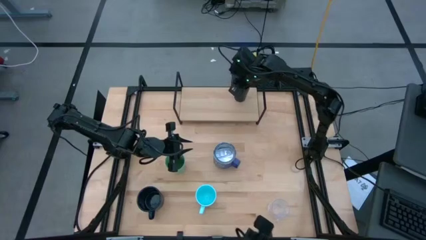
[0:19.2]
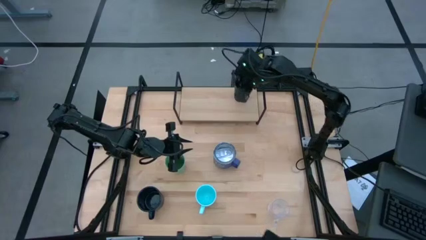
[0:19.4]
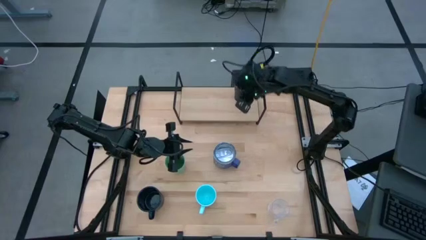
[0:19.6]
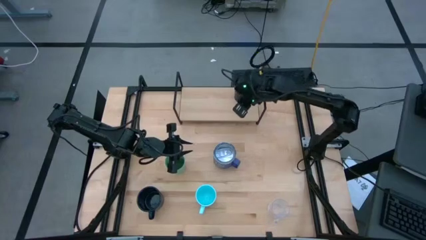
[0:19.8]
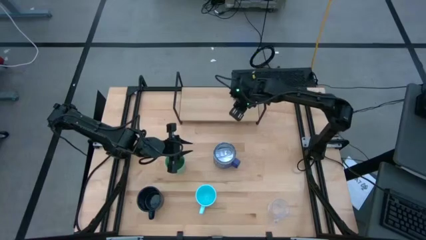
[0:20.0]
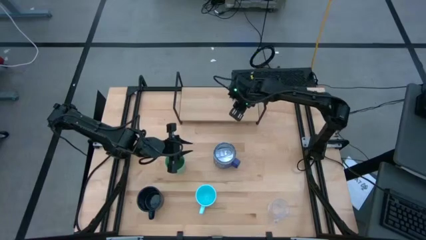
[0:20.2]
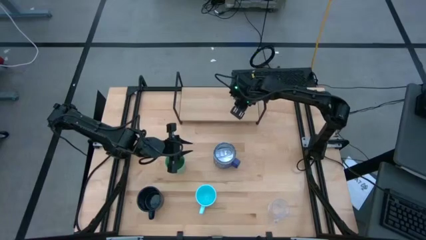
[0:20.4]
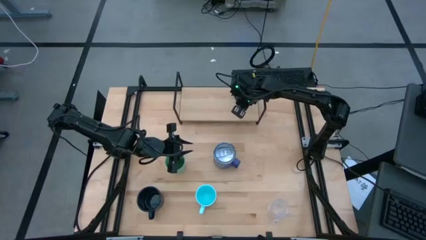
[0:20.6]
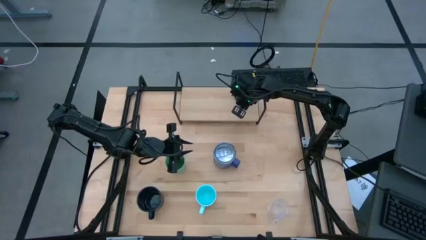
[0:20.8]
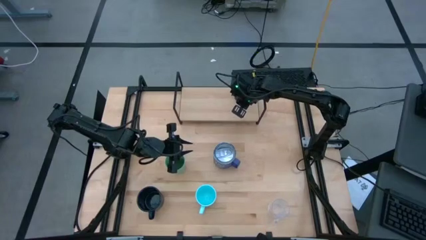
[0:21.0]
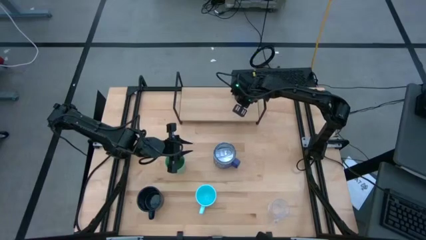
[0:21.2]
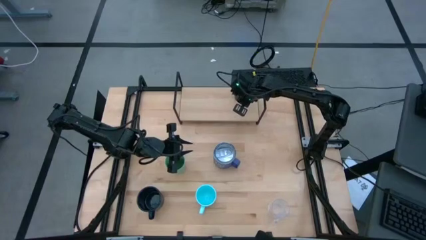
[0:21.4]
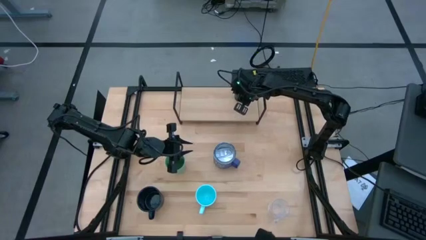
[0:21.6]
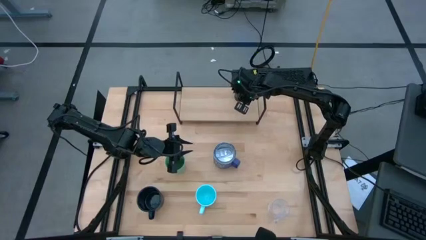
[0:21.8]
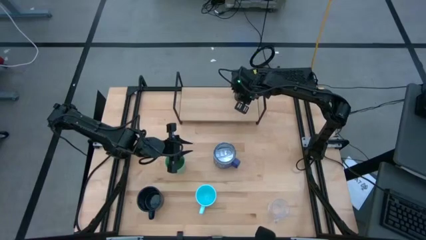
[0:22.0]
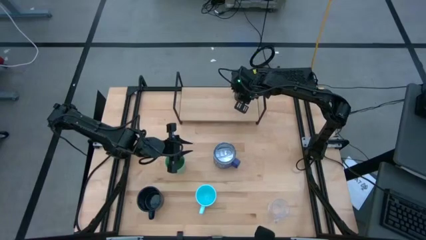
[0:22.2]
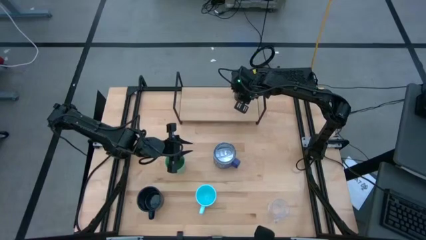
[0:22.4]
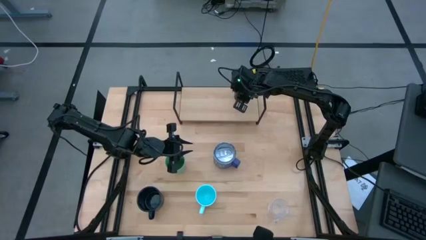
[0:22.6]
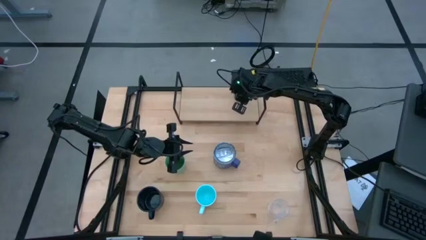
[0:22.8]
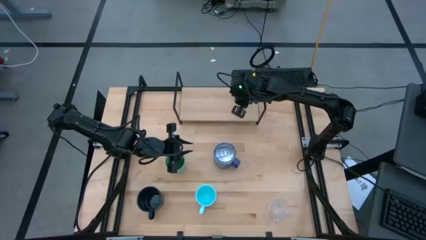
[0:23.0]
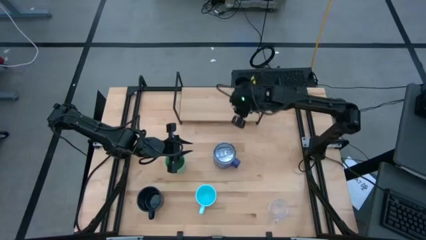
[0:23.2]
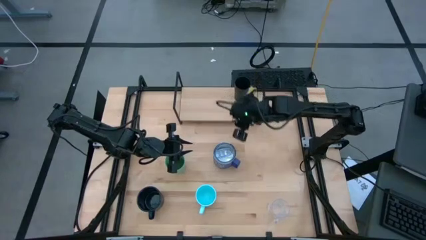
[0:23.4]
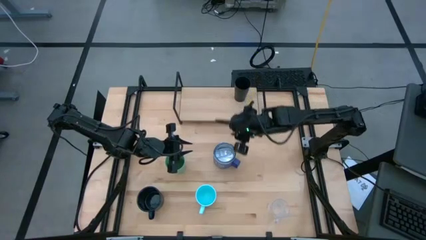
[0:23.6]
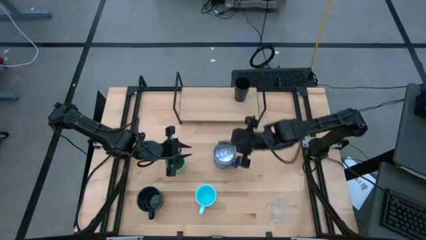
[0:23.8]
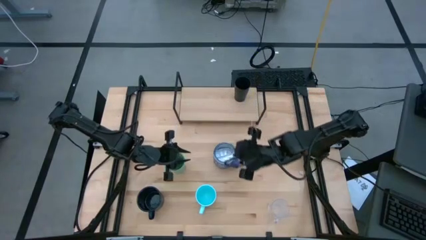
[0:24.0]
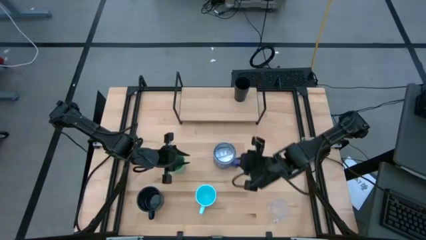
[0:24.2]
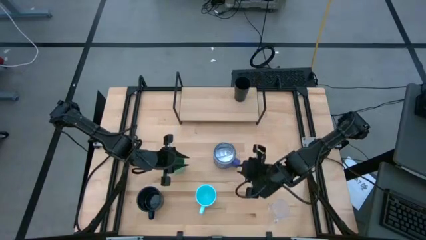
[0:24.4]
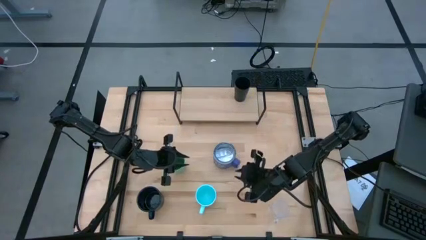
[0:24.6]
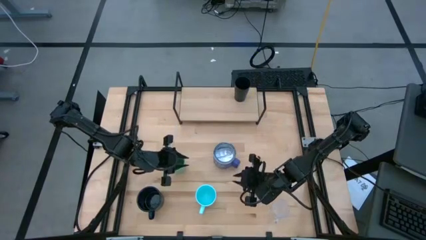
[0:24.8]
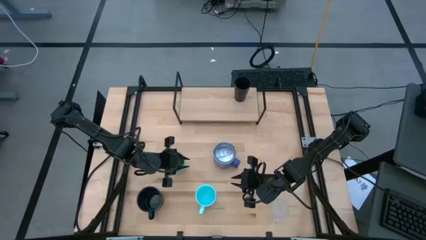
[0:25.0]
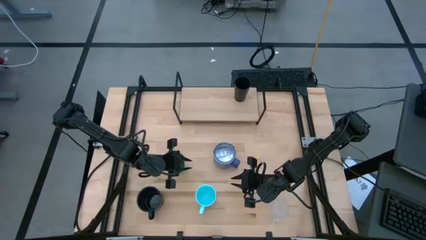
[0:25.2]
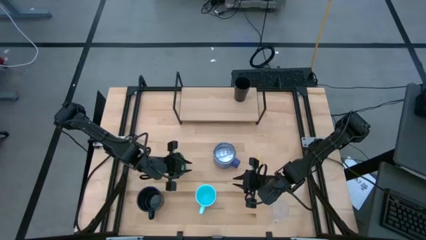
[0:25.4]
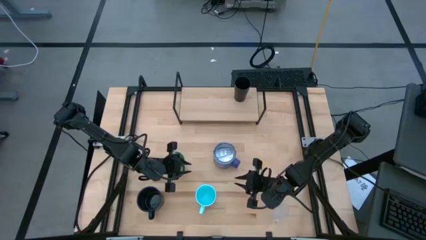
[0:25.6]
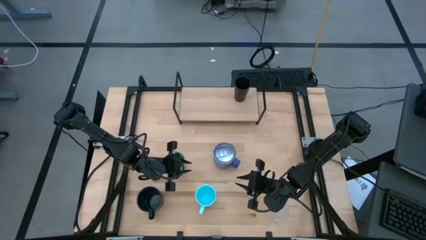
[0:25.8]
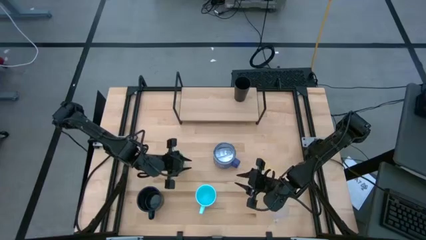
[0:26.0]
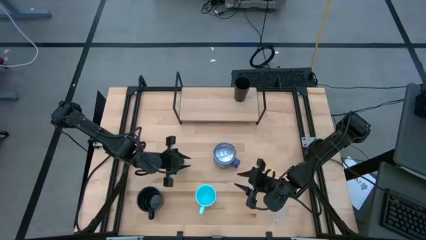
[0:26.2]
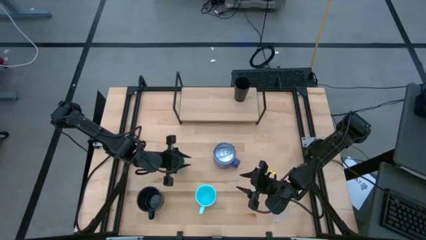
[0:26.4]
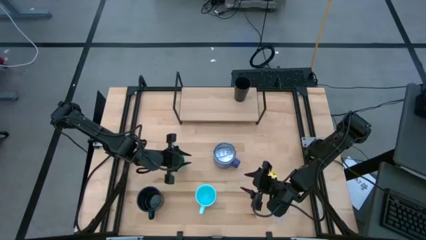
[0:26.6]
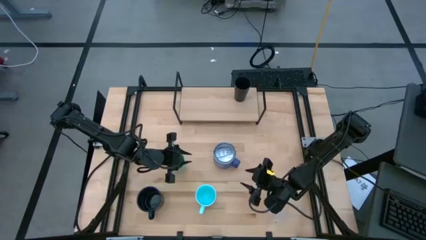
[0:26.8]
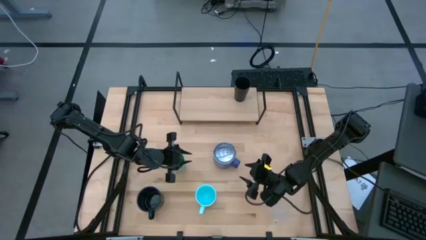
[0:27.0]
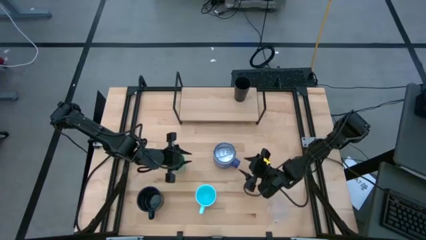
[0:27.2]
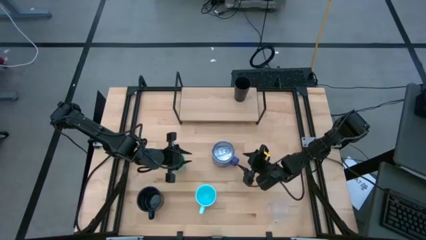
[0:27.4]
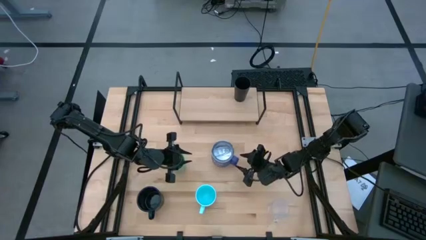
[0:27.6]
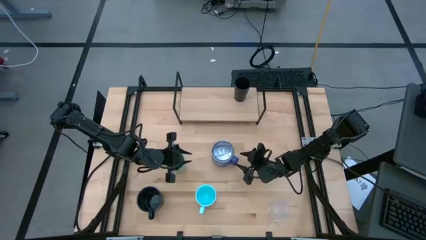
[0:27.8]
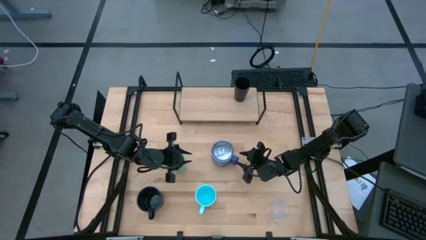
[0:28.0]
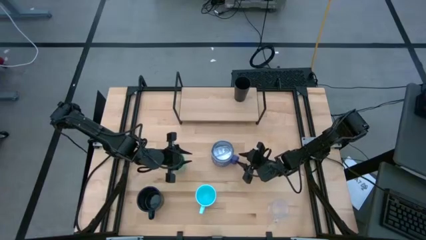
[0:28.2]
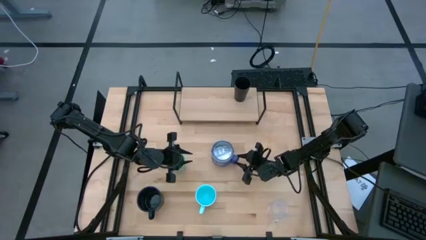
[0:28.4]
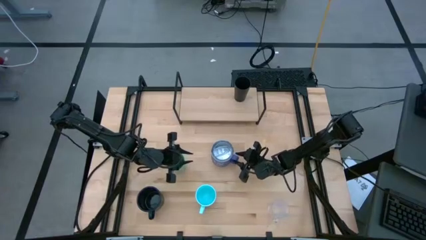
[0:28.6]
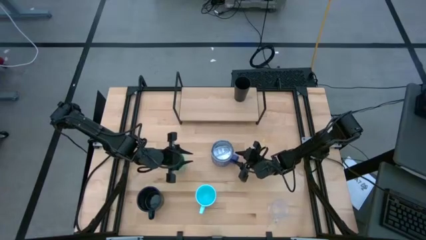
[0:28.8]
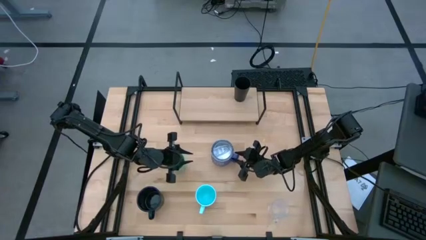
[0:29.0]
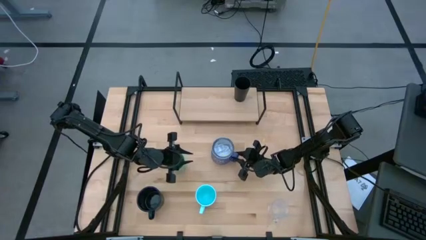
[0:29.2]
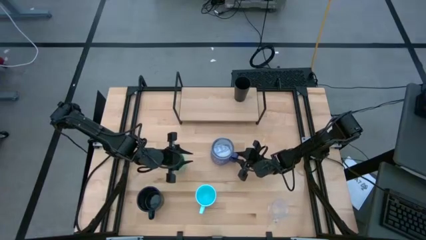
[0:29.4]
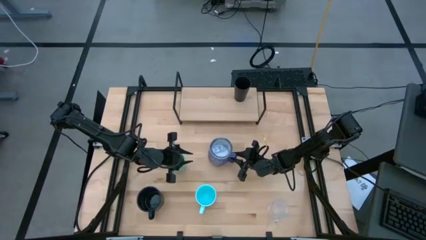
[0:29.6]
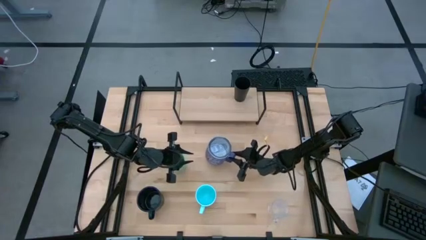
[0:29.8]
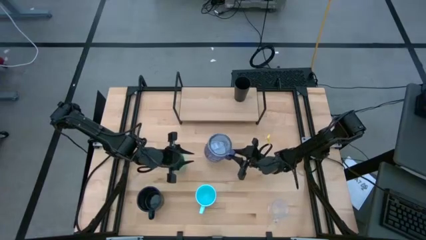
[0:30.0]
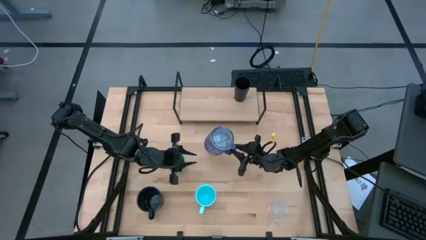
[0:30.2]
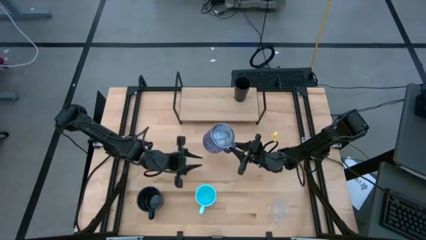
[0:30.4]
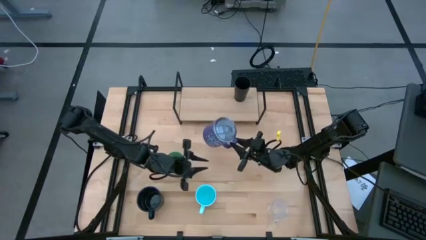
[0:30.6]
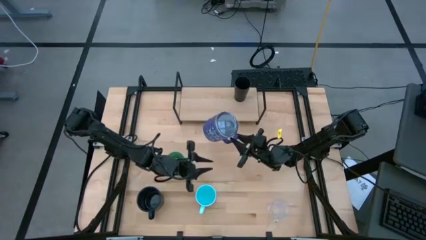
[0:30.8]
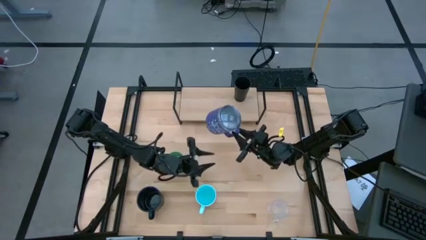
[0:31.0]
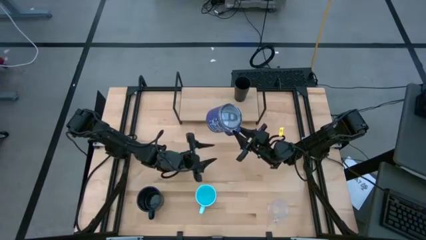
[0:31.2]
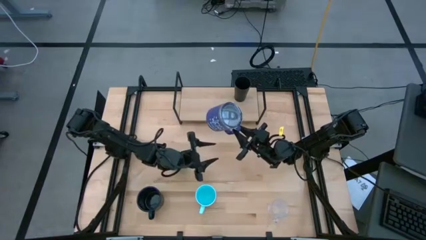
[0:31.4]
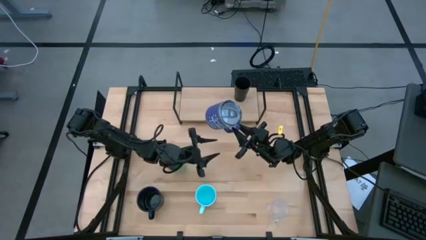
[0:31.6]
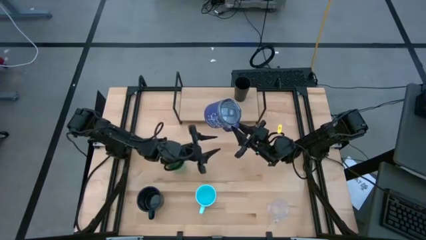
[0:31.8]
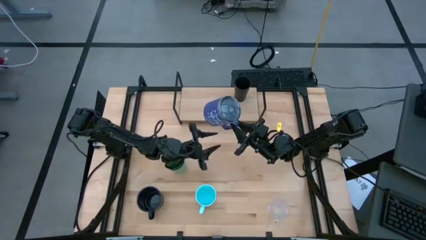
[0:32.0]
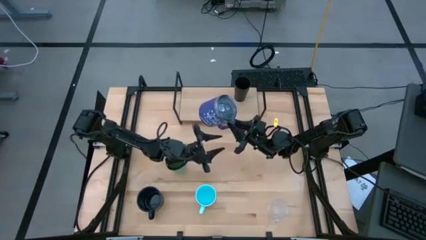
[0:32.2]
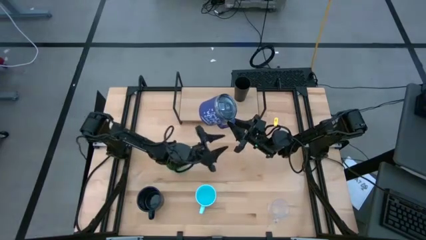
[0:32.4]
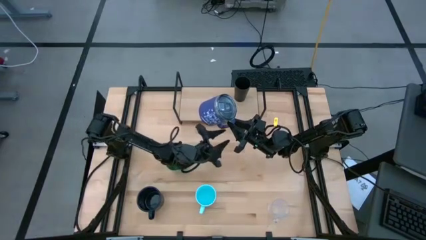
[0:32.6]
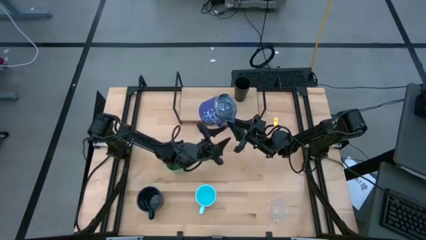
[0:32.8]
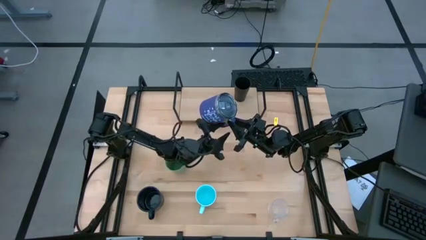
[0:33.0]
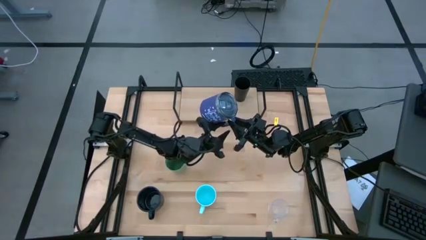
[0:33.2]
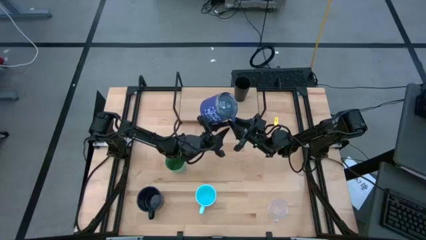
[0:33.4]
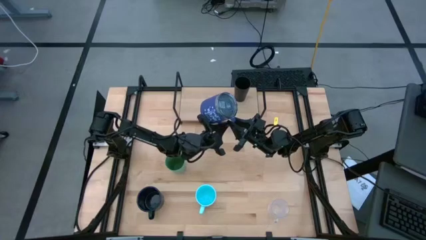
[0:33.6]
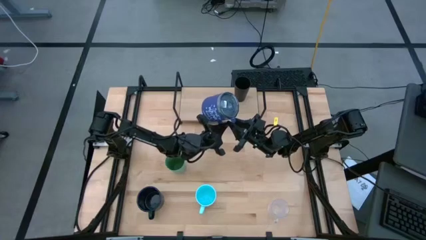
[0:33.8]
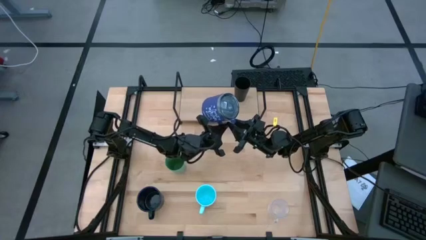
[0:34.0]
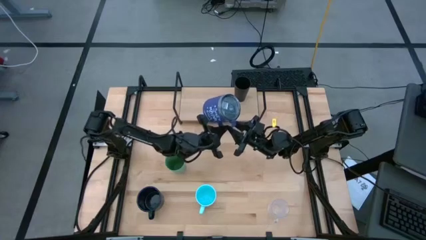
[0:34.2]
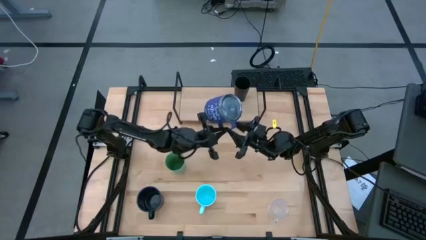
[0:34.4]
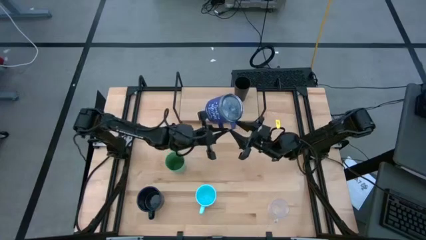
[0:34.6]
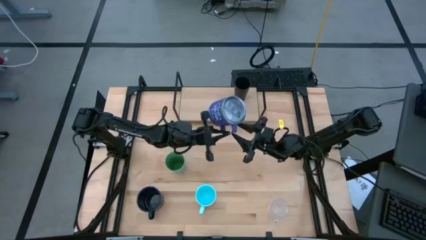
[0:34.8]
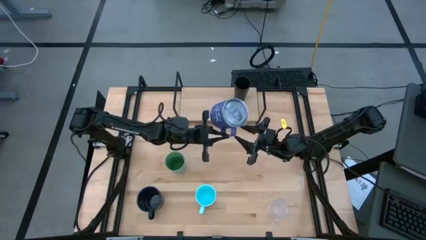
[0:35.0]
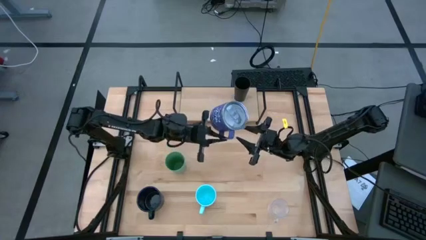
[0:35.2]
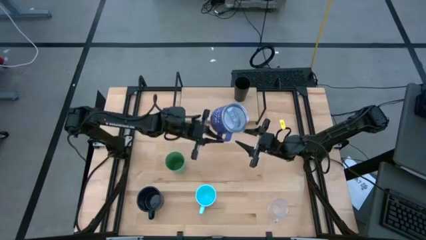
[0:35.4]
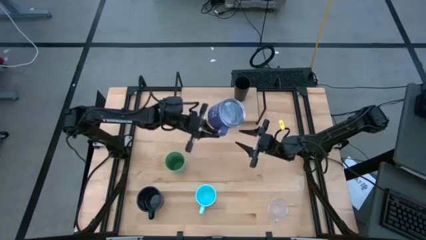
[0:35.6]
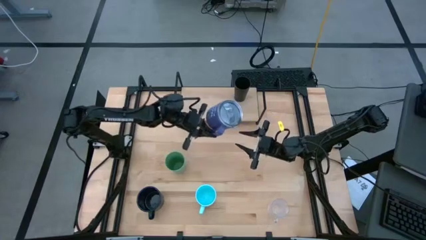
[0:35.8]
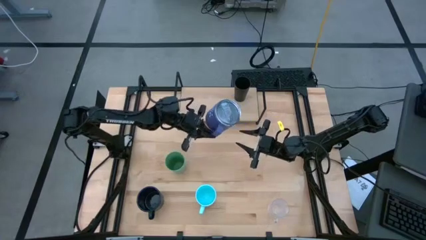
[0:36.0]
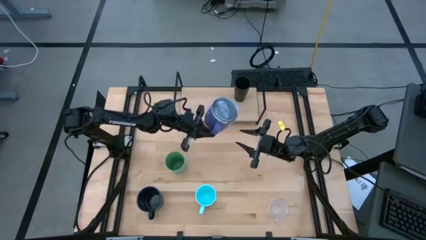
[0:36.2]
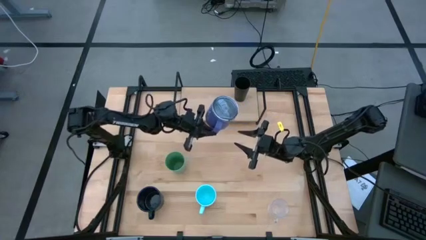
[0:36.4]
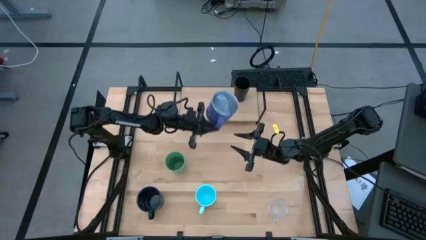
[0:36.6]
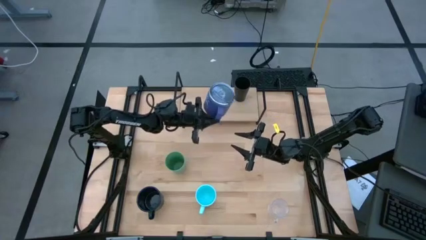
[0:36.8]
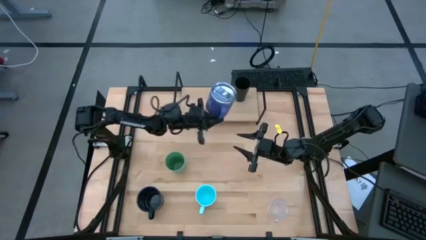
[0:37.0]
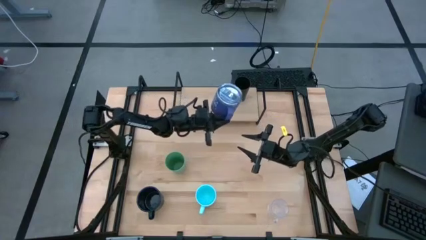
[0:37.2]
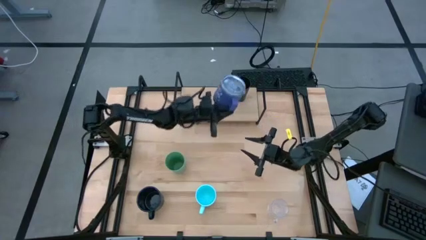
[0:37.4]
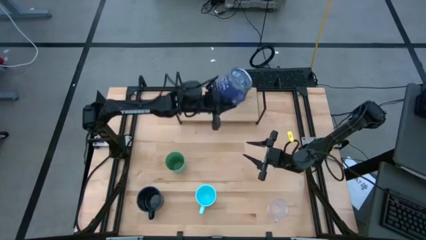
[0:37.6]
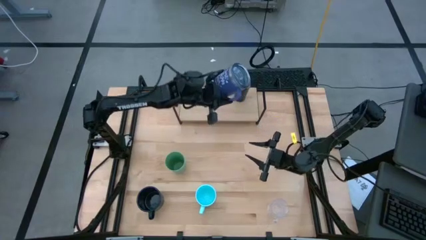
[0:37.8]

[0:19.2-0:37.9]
Task: Stack small to large cups/mugs on shelf
Put the purple mug on the shelf
